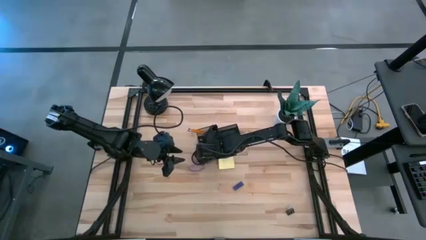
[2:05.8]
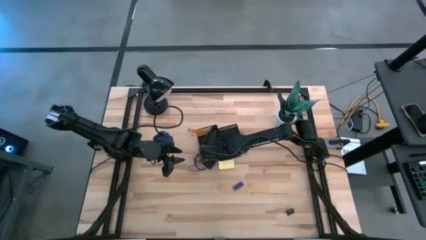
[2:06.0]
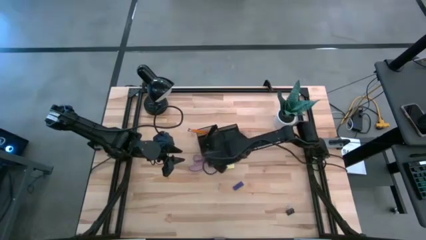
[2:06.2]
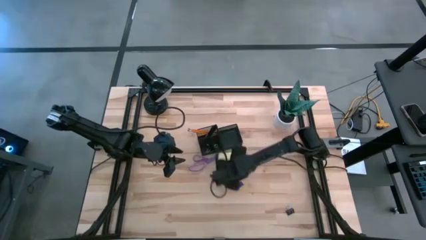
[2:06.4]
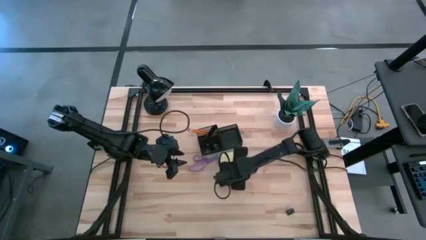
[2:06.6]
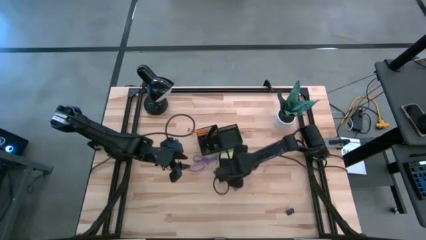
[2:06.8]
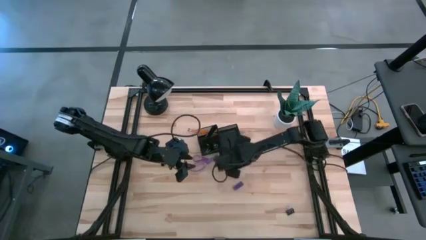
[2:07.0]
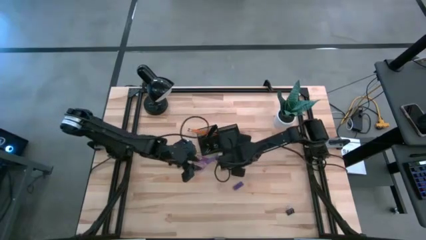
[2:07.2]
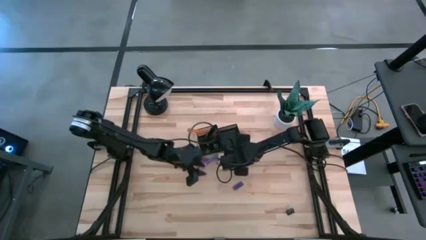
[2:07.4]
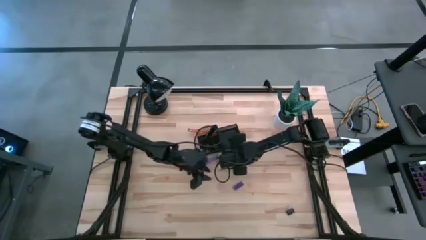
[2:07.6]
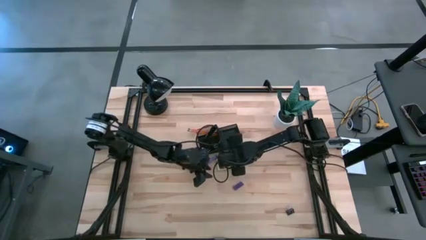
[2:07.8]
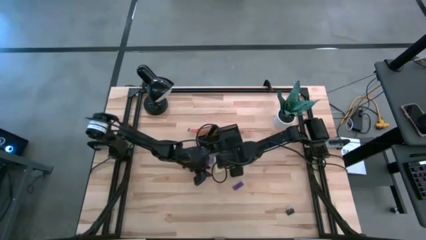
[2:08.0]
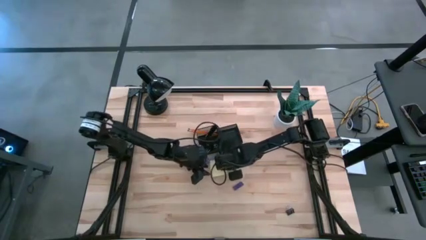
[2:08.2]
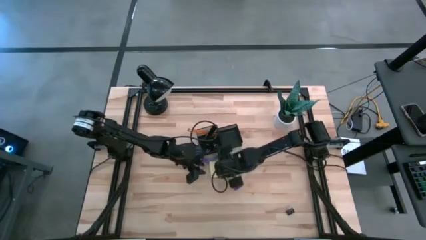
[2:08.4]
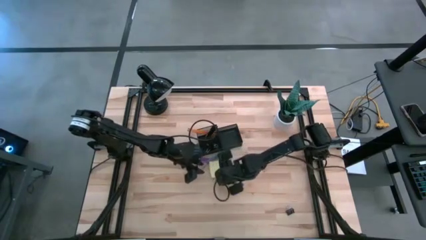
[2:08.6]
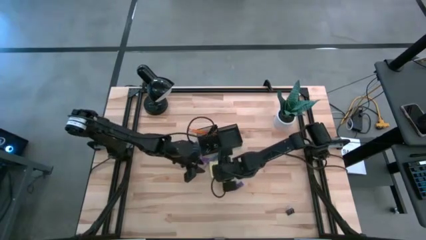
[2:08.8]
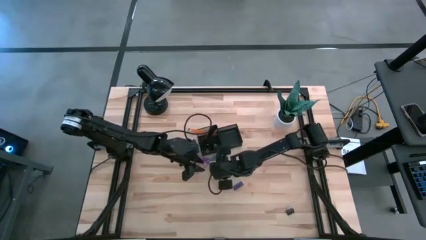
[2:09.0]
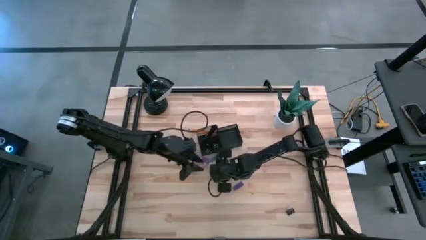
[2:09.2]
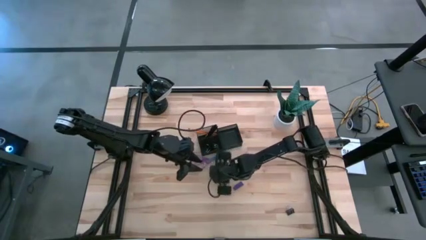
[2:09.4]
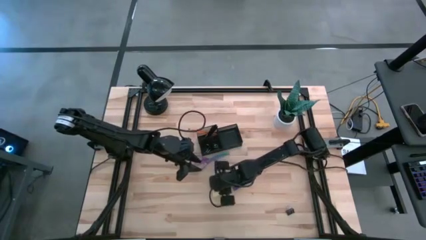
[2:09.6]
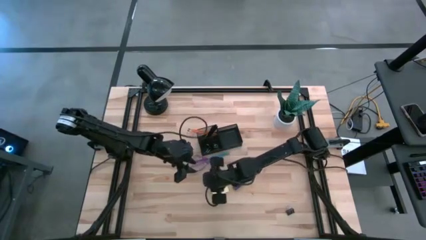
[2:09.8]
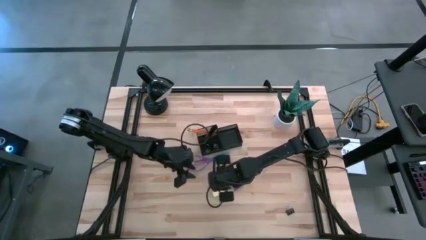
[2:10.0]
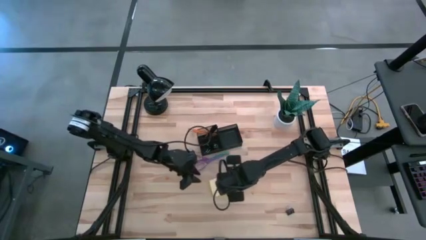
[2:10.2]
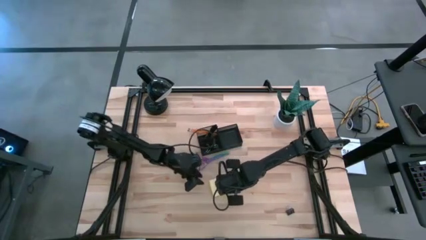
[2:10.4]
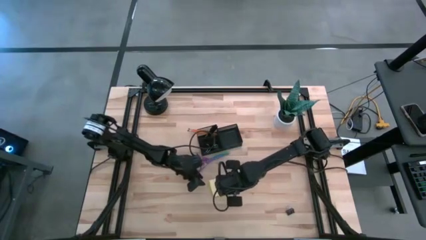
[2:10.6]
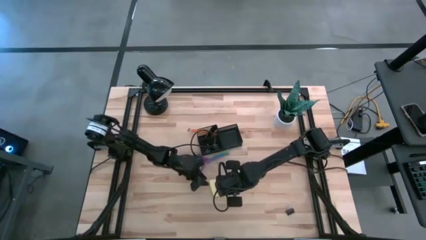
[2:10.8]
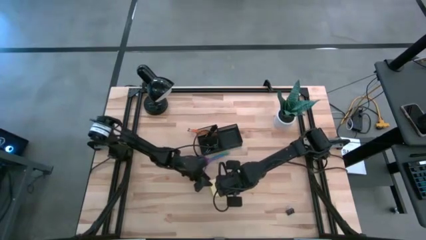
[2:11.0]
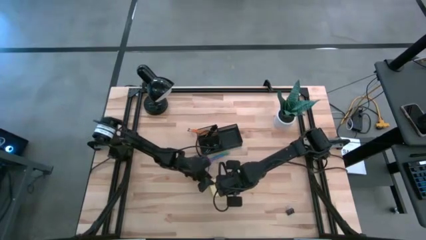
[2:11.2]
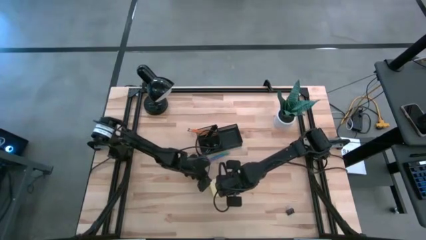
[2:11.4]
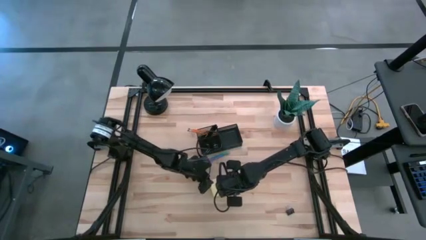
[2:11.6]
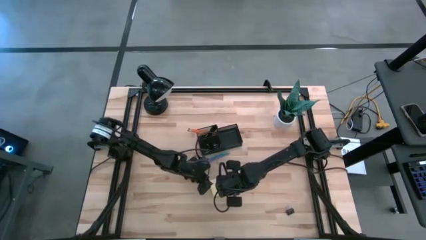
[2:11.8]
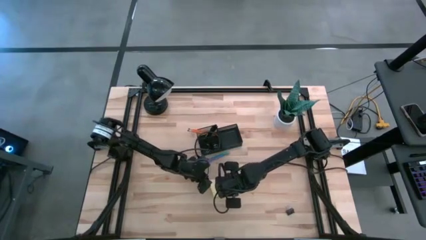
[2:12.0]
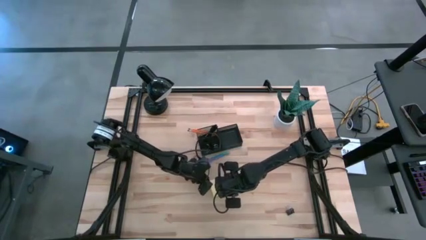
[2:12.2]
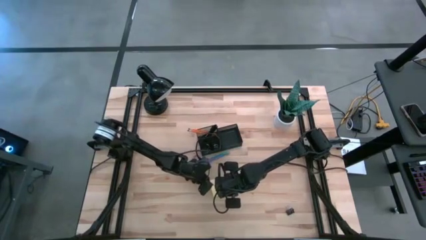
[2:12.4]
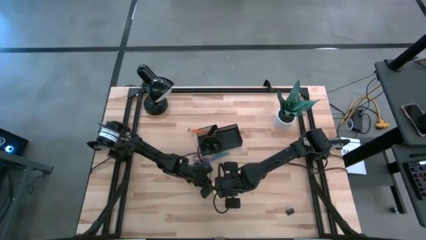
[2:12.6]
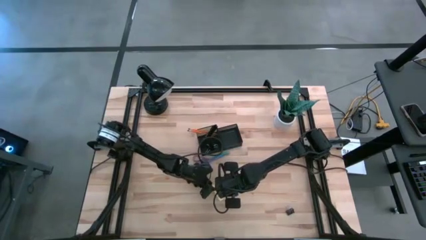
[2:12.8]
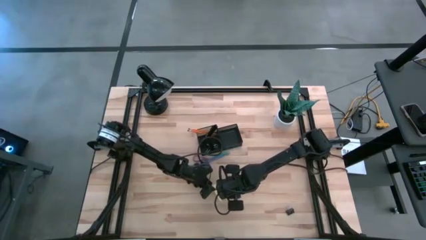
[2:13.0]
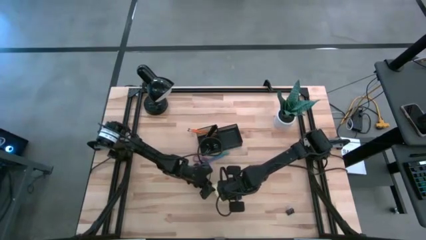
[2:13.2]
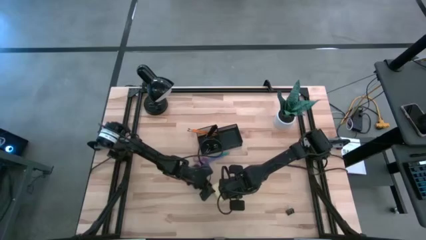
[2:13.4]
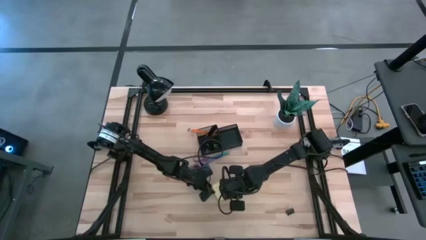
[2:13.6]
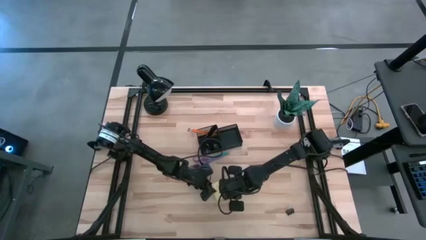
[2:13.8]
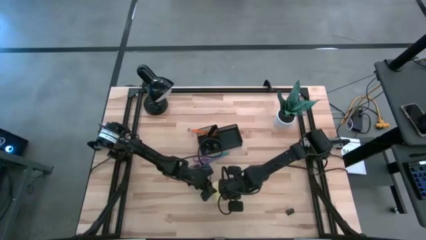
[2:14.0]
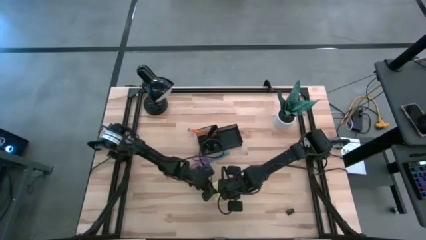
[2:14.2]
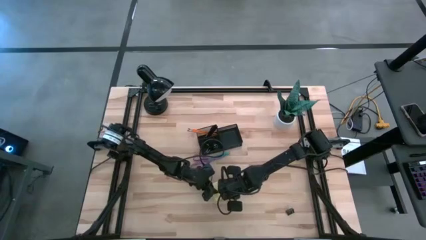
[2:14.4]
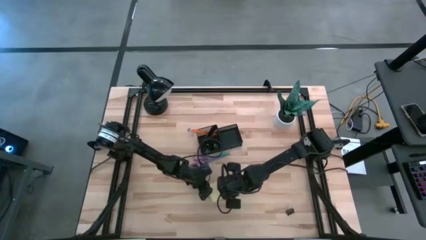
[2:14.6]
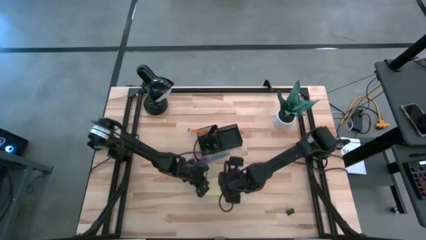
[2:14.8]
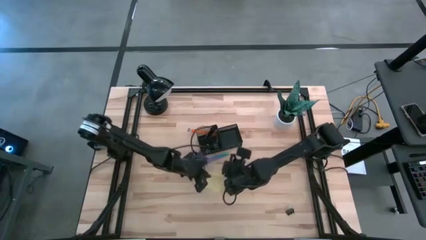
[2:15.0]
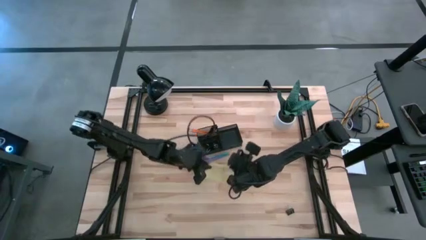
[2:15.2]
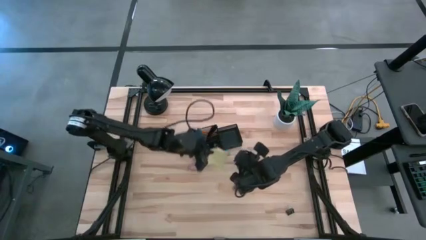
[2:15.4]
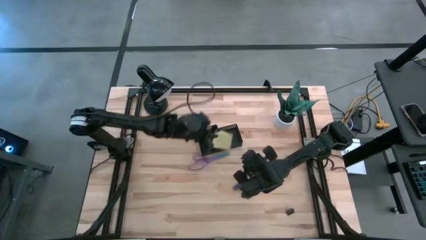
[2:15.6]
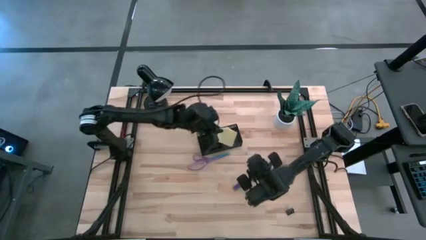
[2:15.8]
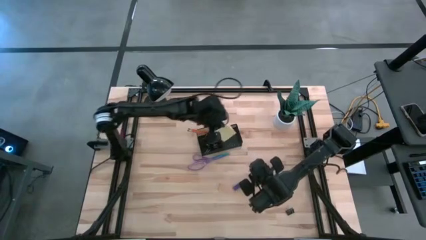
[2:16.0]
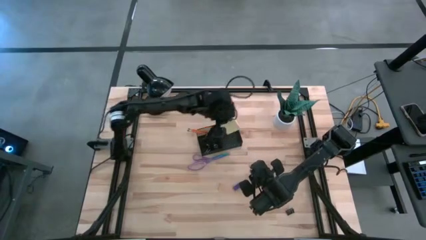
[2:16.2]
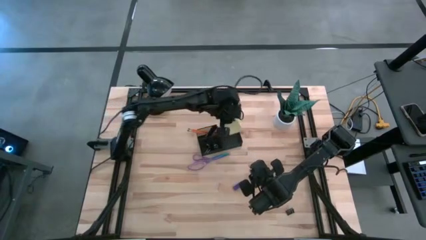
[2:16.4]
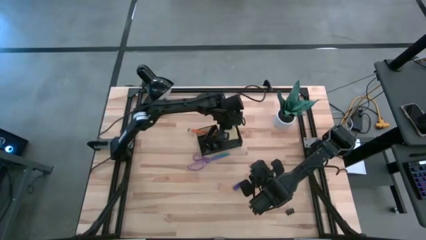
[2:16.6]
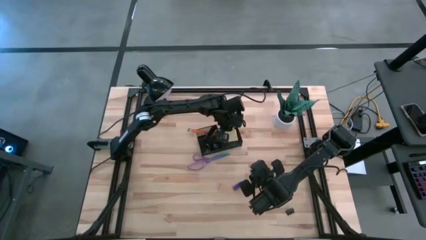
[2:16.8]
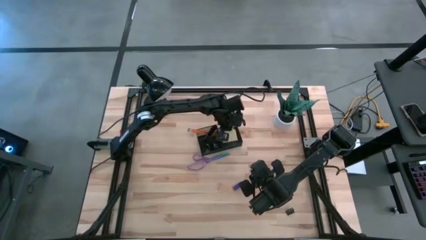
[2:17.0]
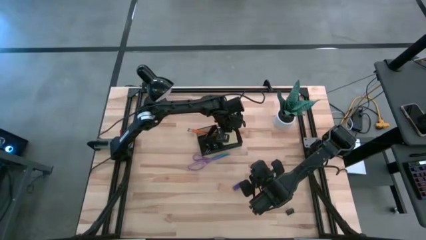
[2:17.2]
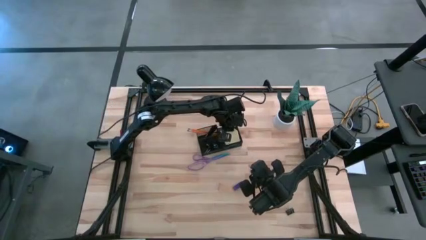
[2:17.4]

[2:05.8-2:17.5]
Task: Pick and place office supplies into organizer
Put the yellow sticky notes into the black desk organizer

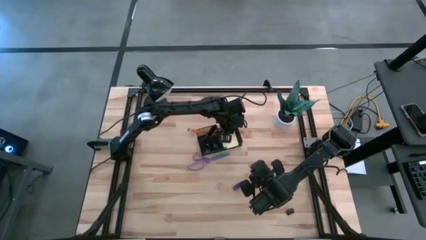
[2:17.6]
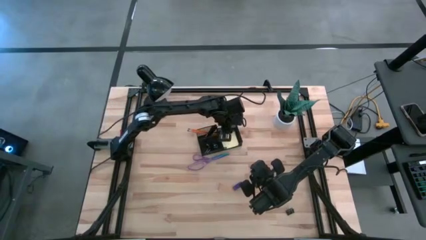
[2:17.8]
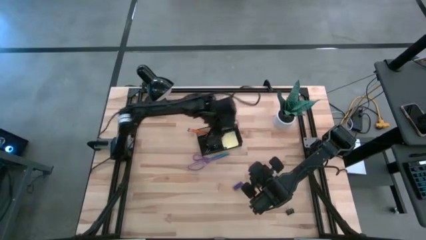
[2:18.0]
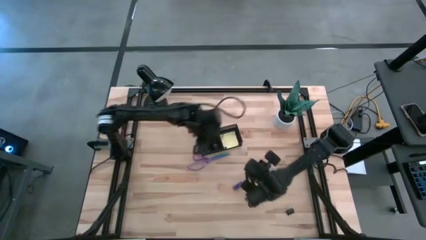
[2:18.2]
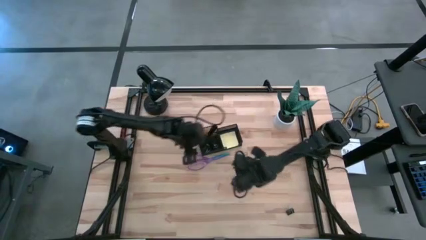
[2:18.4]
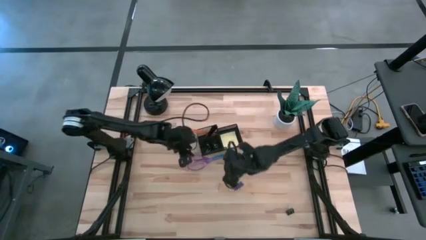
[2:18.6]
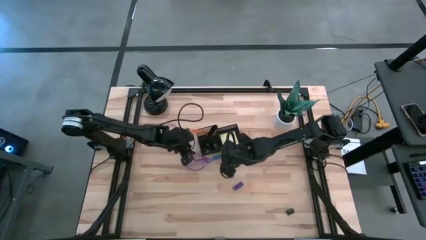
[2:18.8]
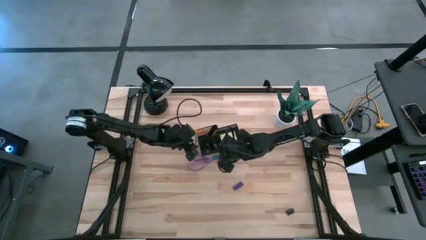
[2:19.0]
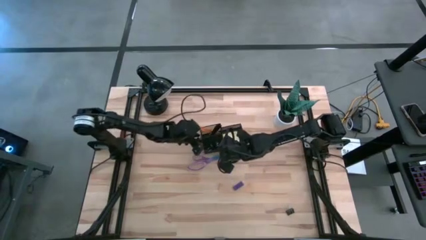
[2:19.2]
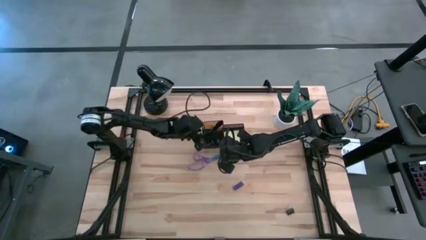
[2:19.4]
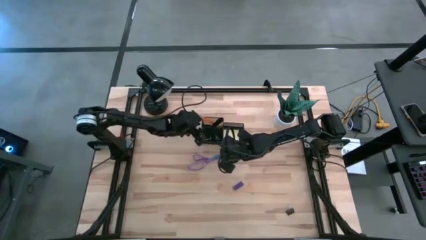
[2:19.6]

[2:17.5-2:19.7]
Adjust the black desk organizer

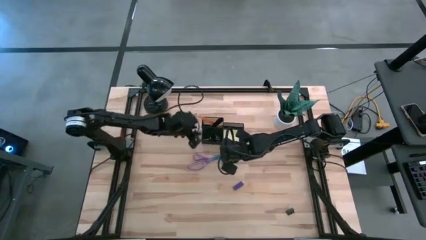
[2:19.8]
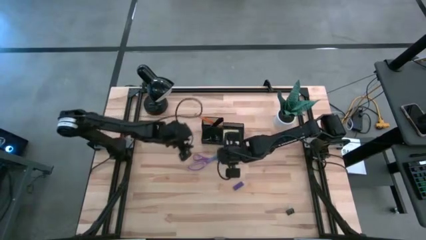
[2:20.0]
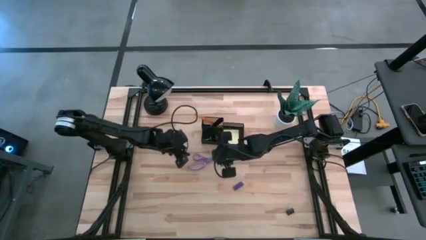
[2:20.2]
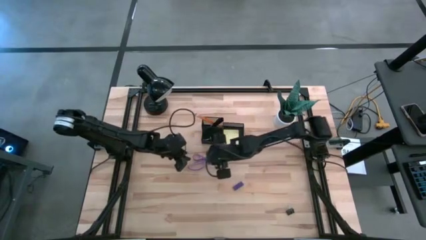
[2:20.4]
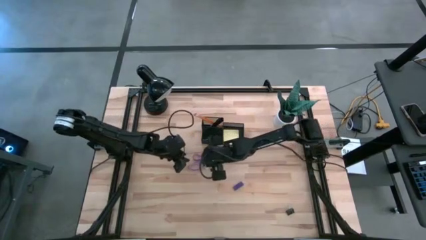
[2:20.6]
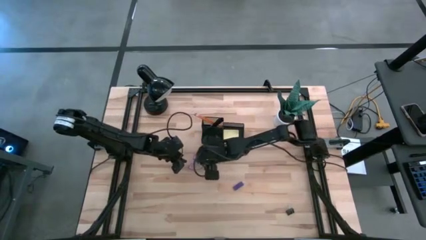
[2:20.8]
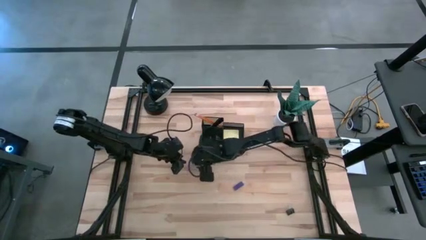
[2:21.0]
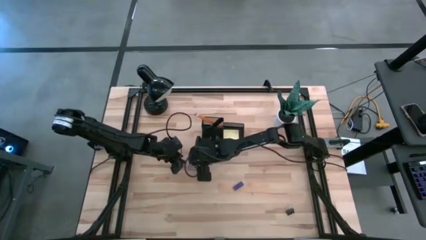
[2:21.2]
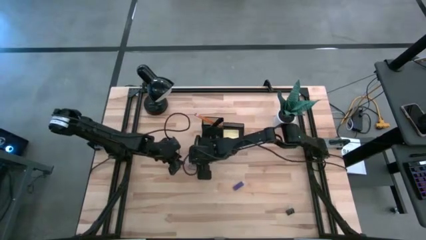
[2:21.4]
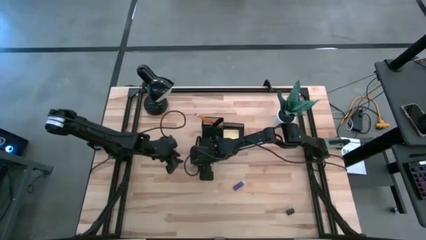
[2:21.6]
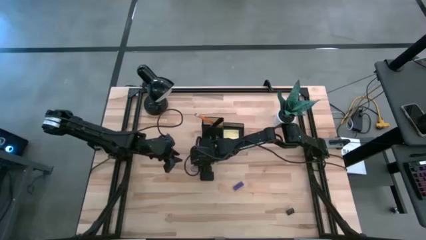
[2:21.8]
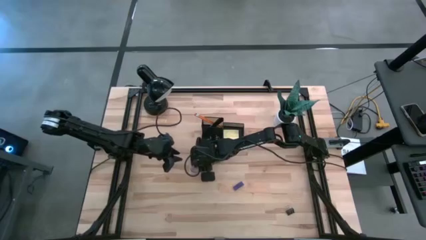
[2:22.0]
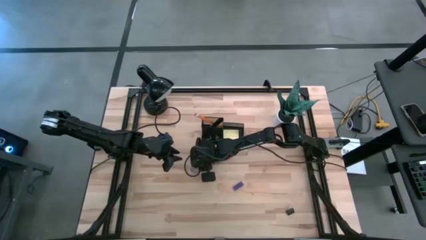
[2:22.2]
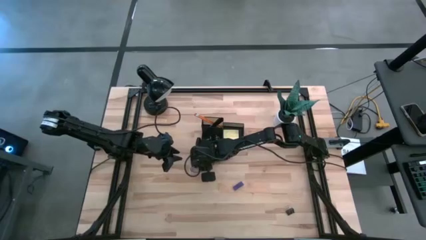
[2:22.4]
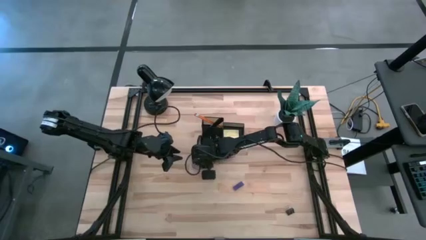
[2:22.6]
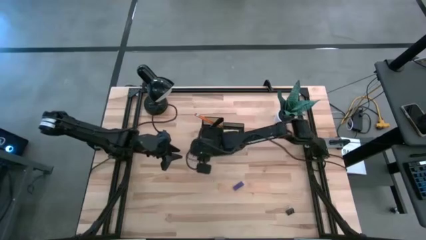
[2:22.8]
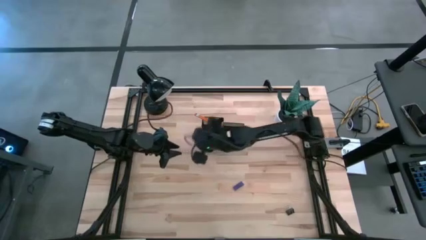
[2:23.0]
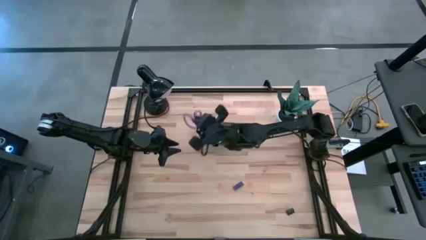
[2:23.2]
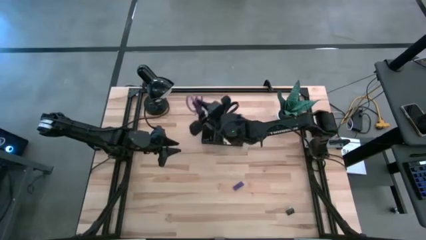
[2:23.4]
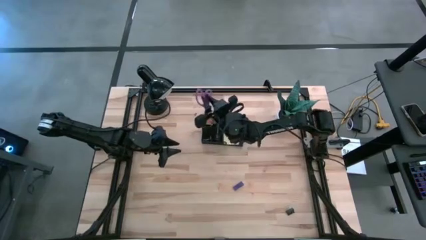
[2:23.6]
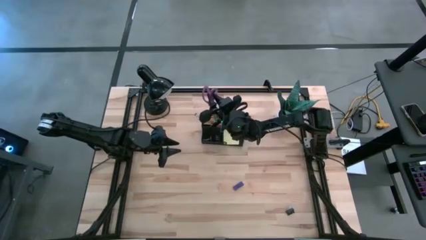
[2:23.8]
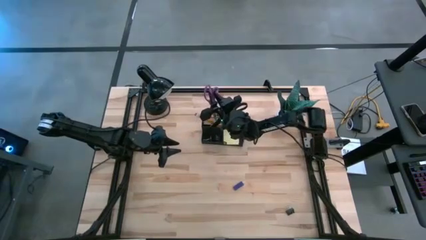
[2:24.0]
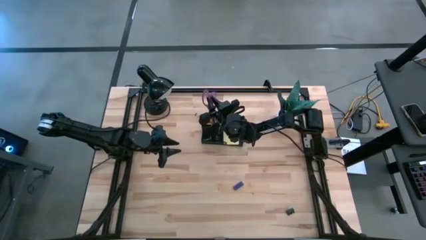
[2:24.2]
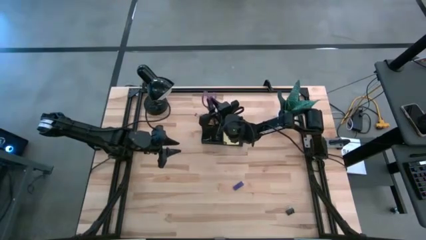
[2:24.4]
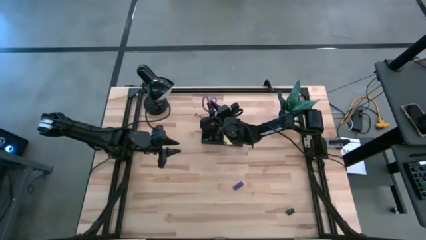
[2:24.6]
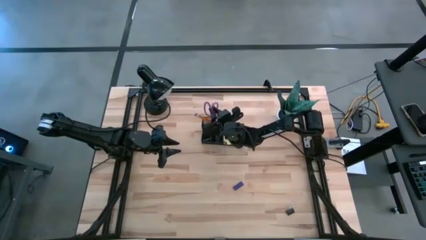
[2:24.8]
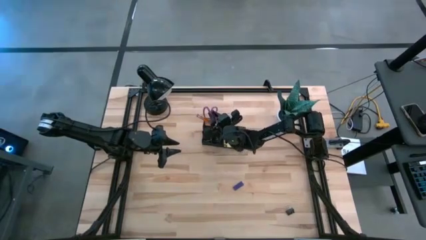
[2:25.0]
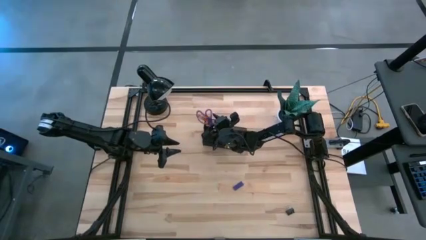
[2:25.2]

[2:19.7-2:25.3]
Put the purple scissors into the black desk organizer
